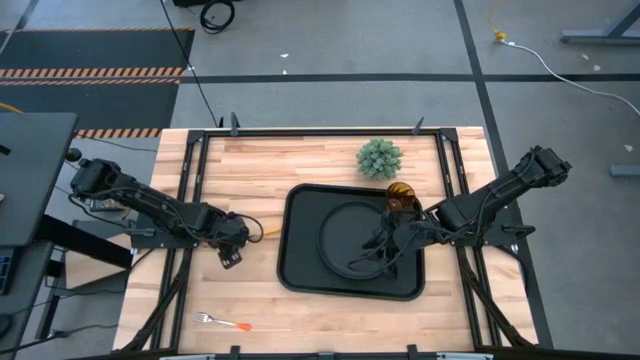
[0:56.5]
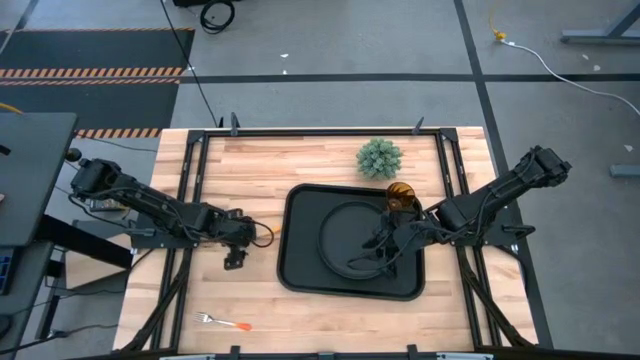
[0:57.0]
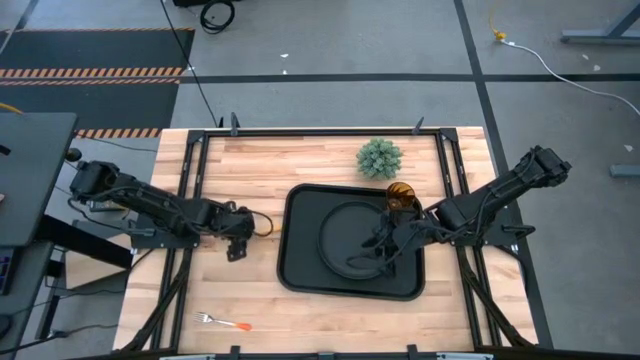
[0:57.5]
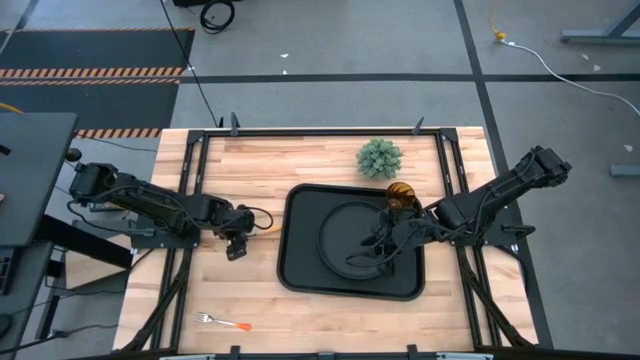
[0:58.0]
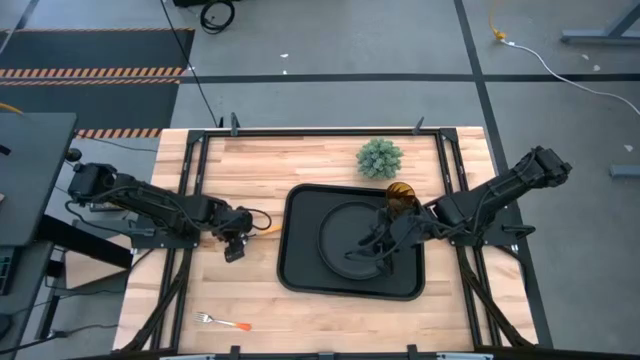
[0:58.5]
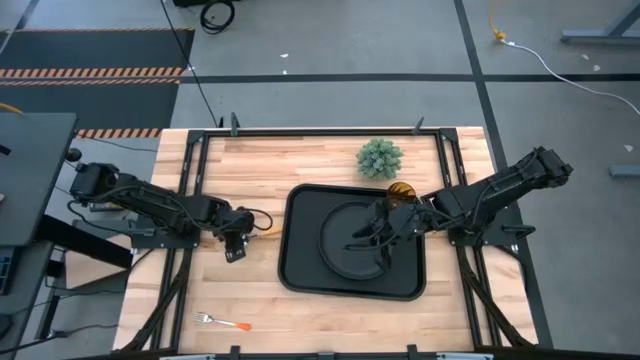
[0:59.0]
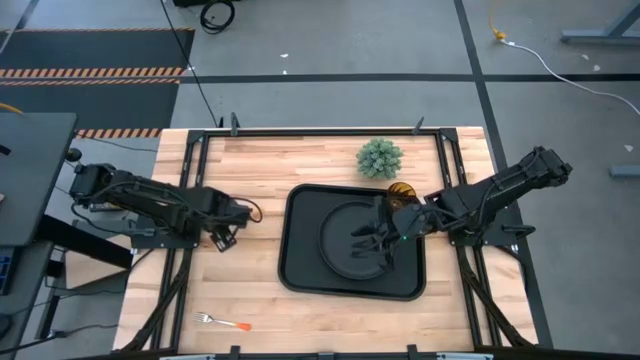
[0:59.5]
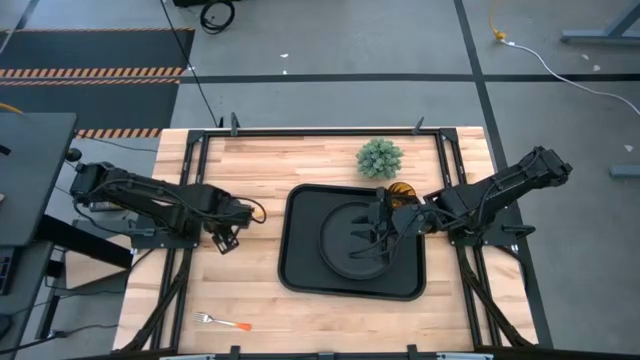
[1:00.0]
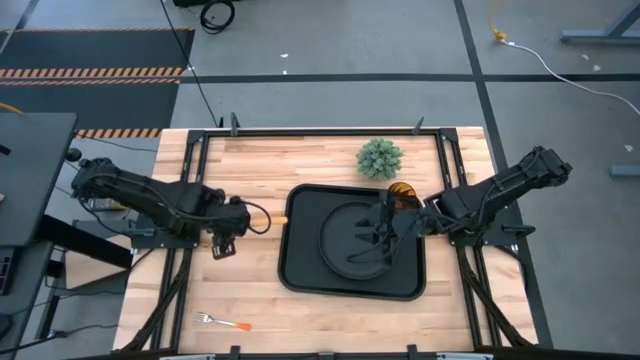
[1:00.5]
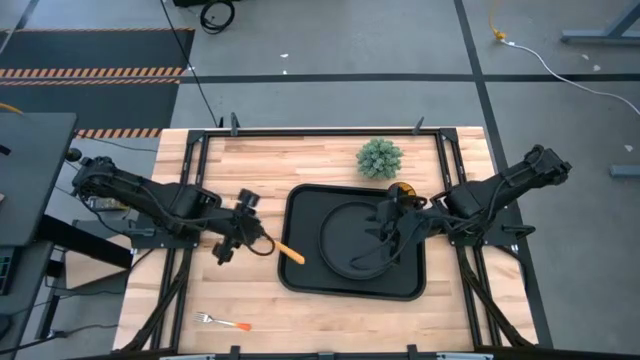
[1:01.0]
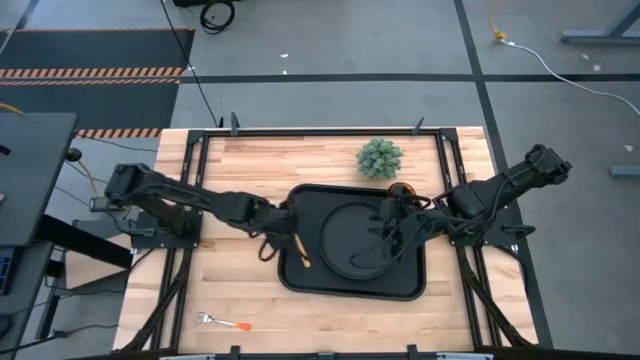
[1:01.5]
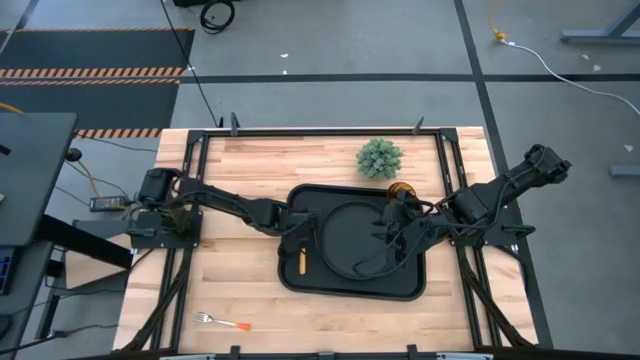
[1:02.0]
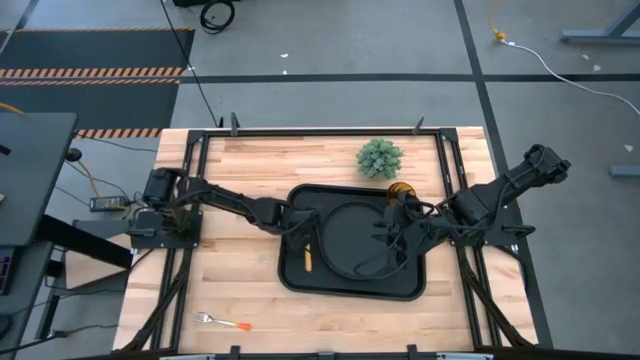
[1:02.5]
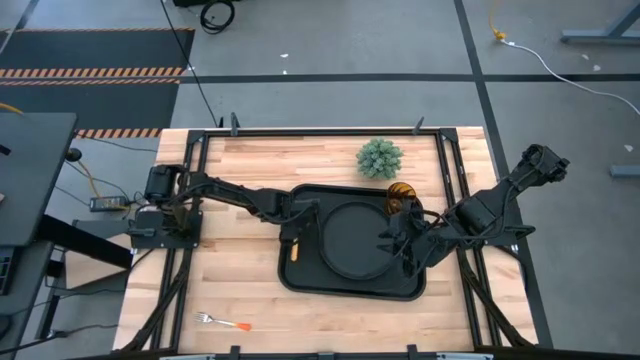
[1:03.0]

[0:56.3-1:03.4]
Task: Pick and place plate/cup/fork/spoon on tray
Put the yellow spoon on the black serving tray

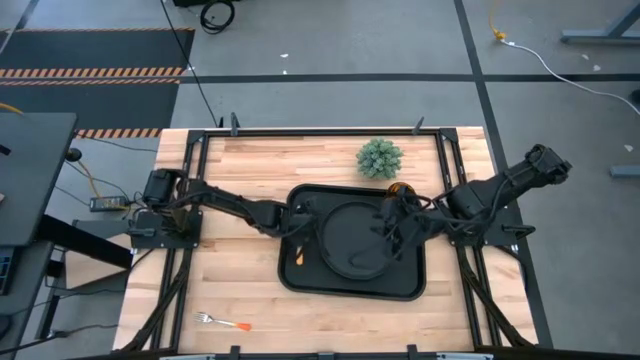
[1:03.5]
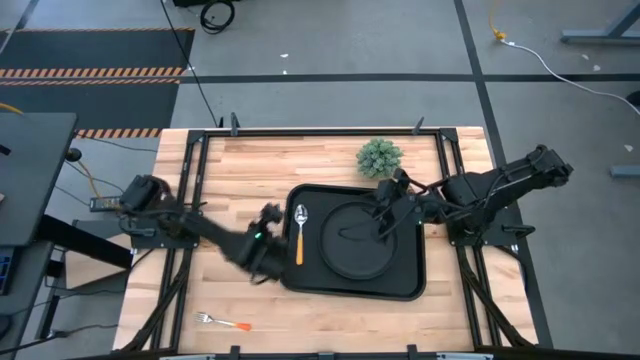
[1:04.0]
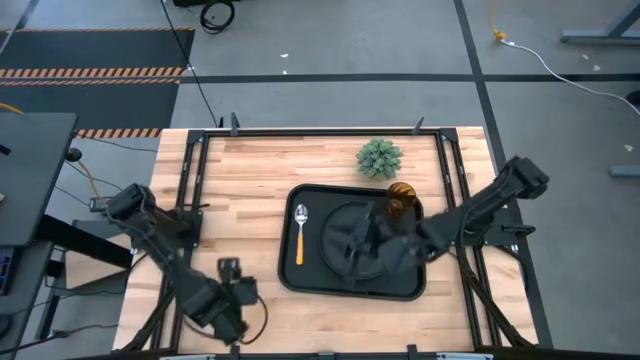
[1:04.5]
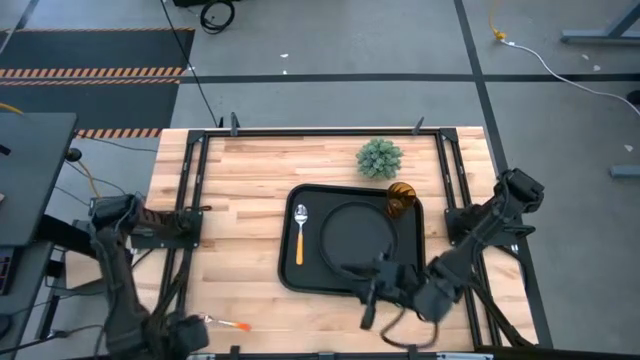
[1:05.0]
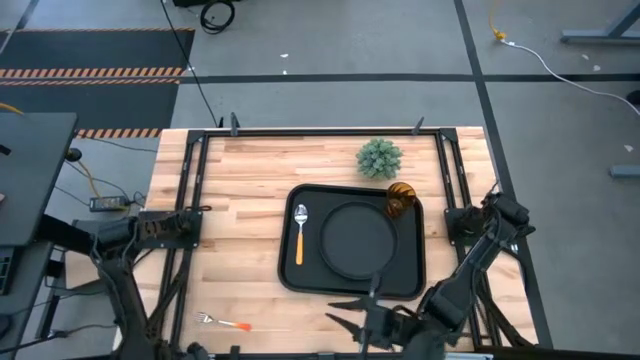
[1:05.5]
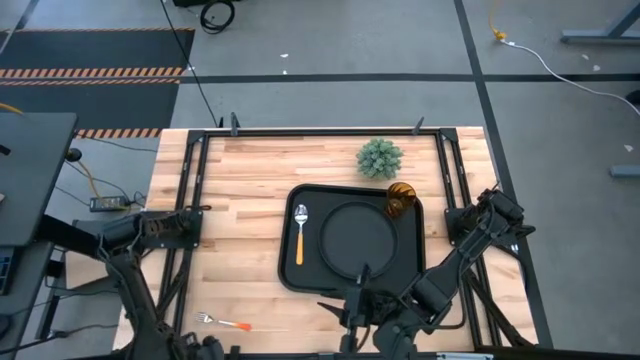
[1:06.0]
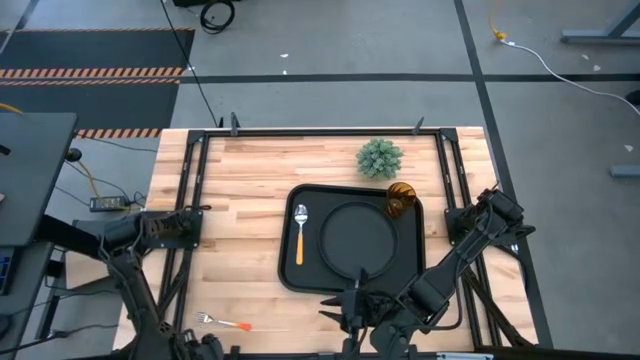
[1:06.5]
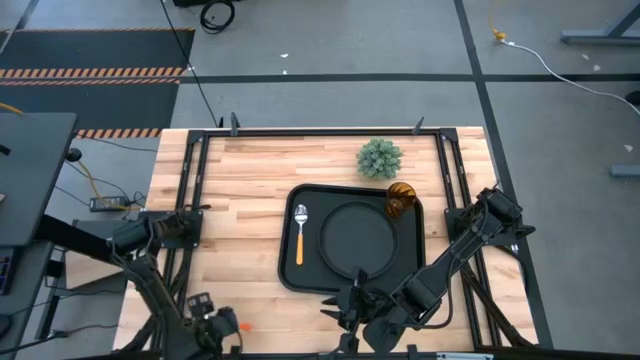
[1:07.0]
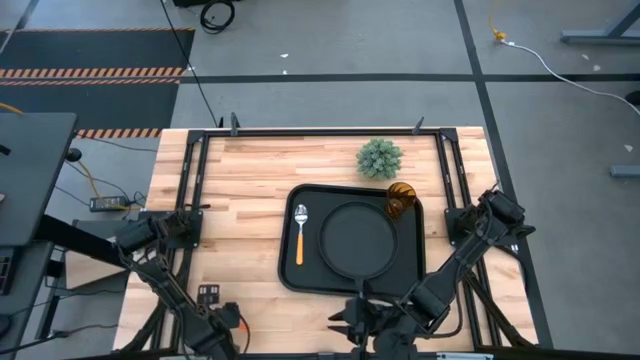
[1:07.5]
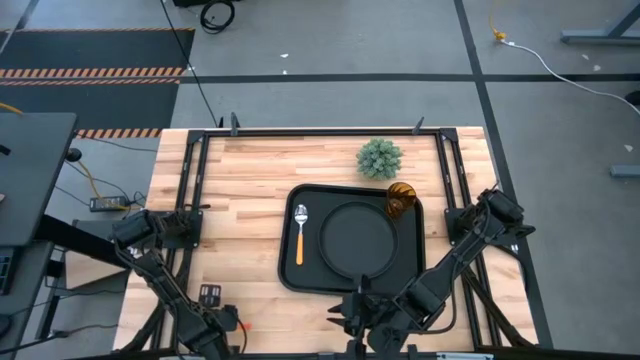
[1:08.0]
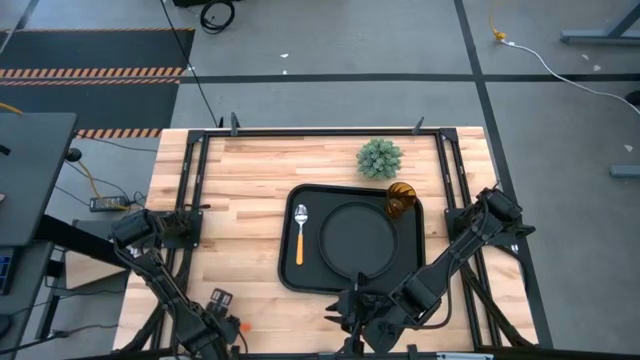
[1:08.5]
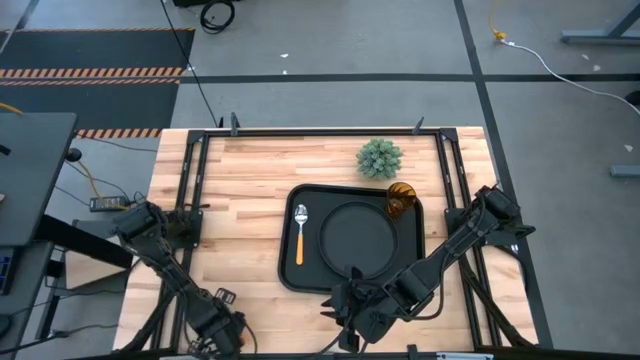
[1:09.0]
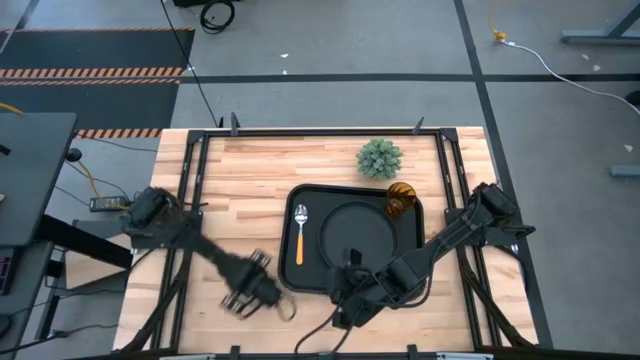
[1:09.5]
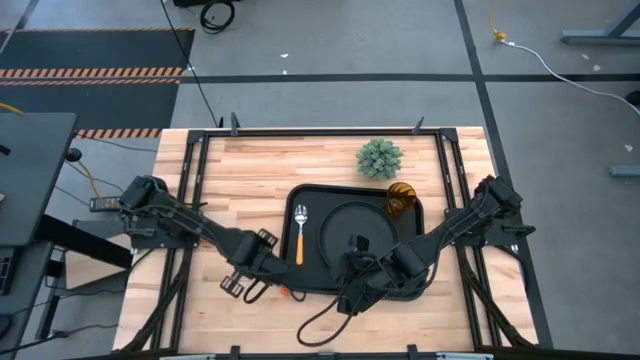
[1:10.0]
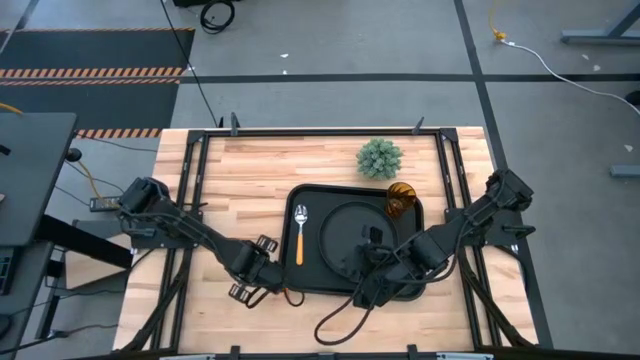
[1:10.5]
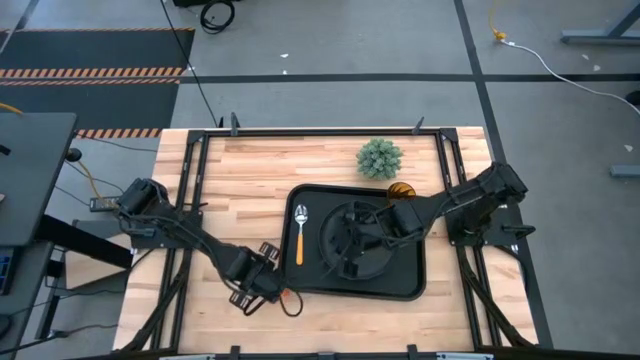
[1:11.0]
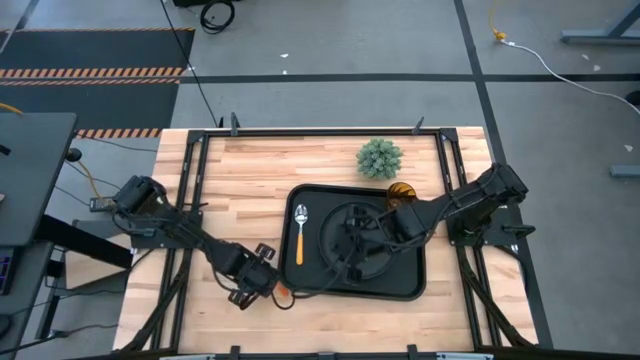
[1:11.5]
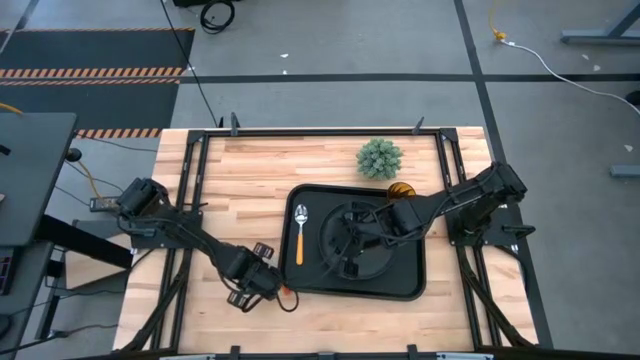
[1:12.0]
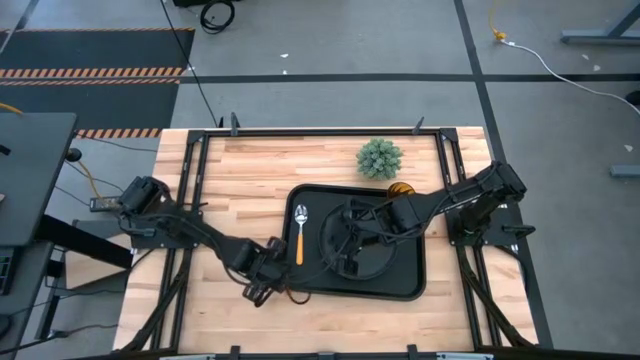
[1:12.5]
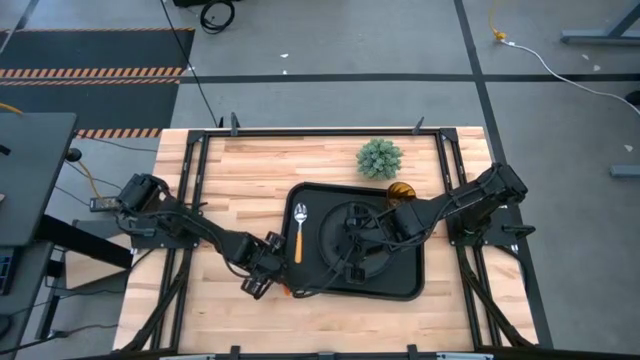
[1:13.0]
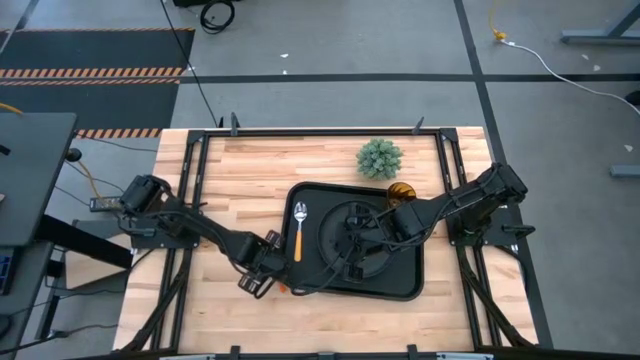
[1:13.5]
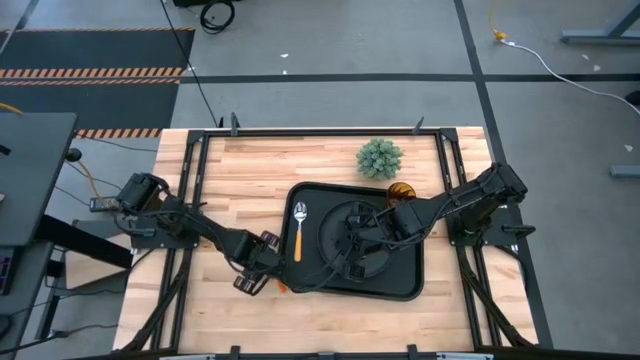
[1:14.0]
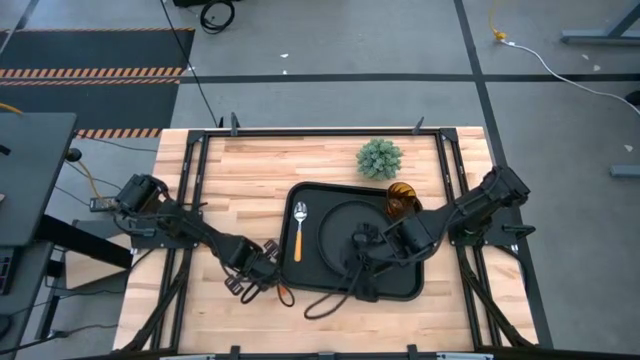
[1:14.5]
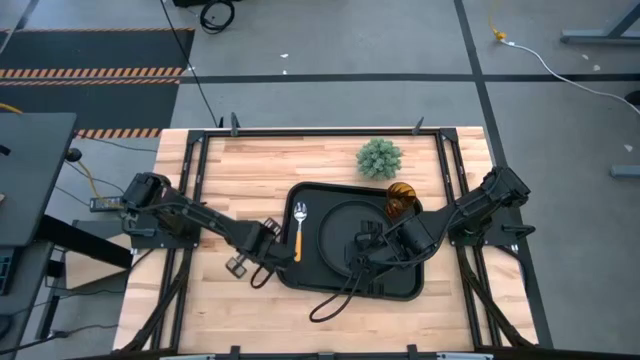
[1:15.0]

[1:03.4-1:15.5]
Put the orange fork on the black serving tray
